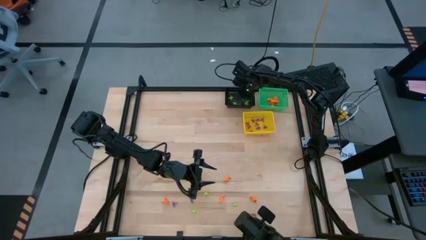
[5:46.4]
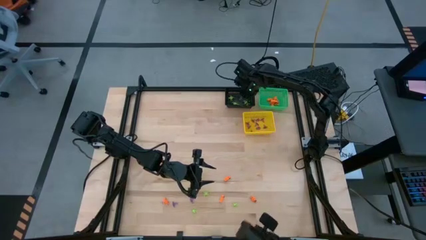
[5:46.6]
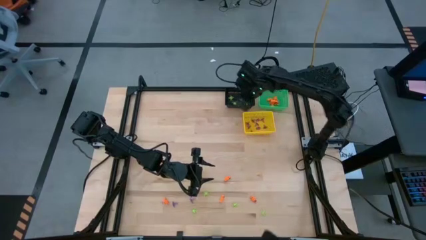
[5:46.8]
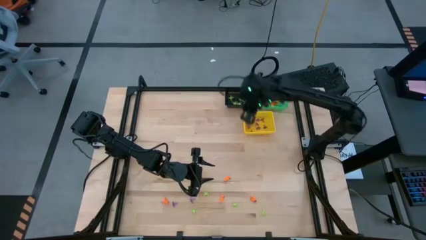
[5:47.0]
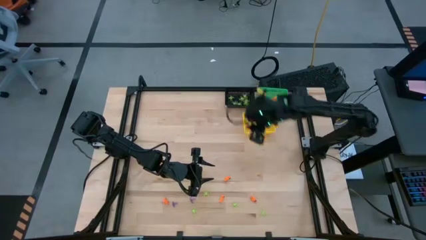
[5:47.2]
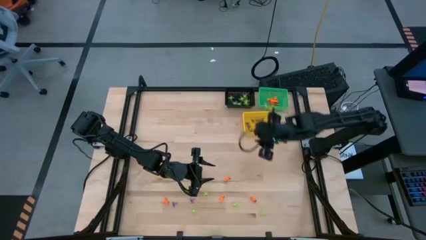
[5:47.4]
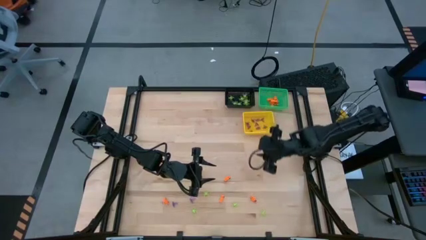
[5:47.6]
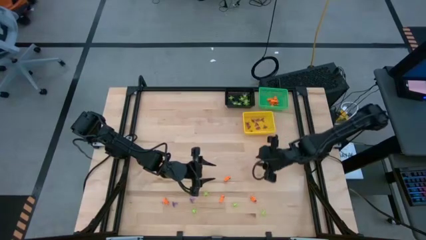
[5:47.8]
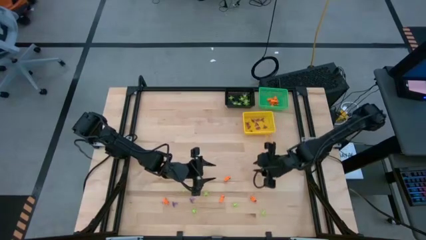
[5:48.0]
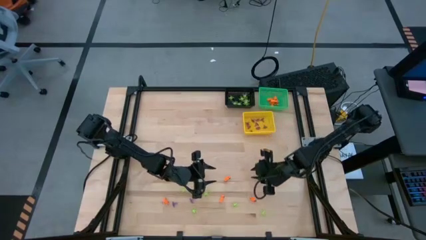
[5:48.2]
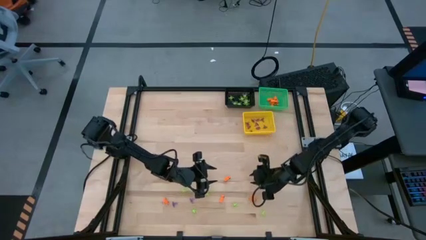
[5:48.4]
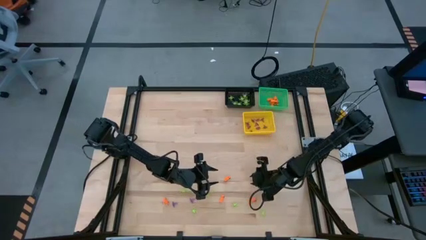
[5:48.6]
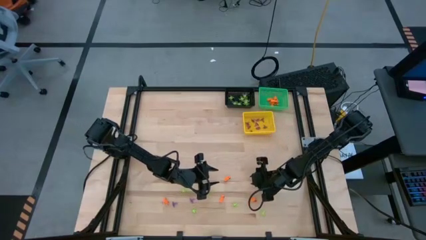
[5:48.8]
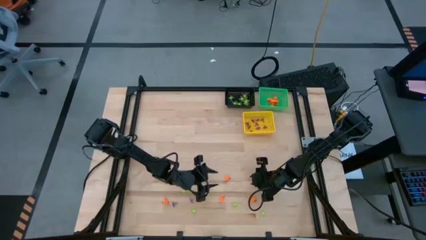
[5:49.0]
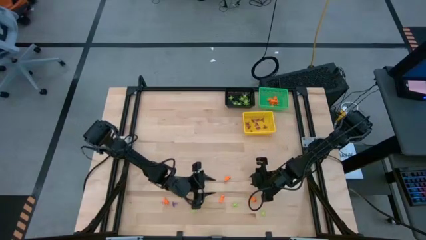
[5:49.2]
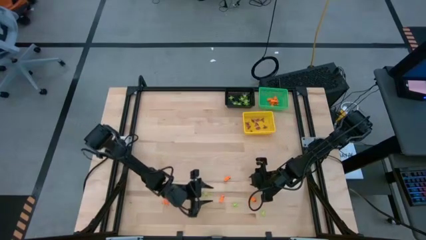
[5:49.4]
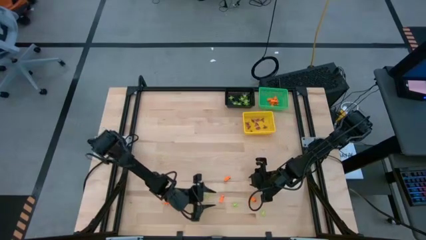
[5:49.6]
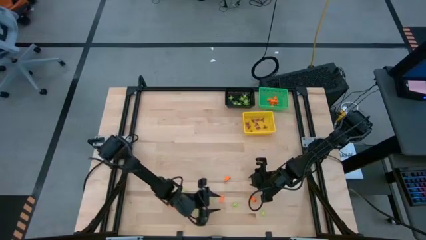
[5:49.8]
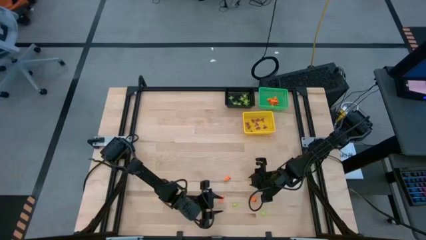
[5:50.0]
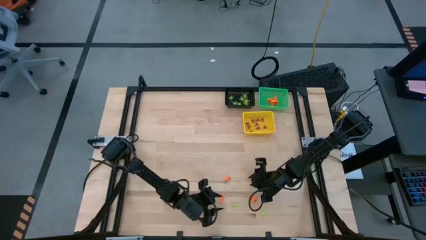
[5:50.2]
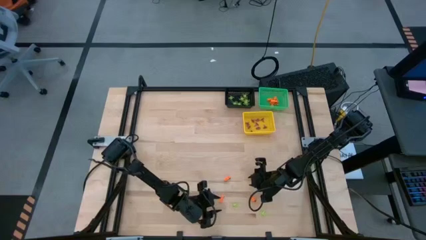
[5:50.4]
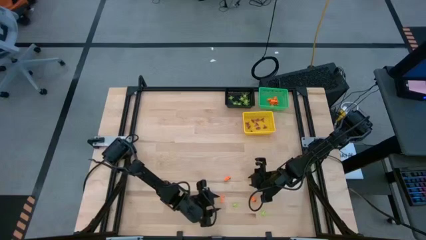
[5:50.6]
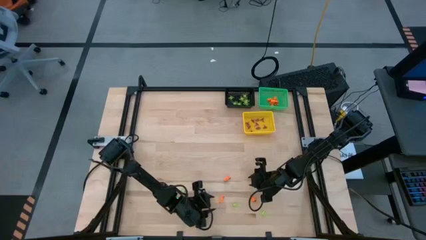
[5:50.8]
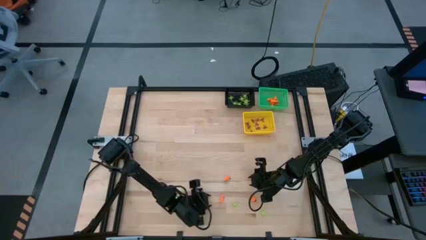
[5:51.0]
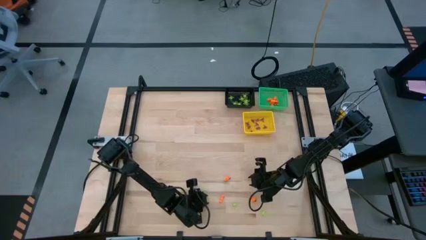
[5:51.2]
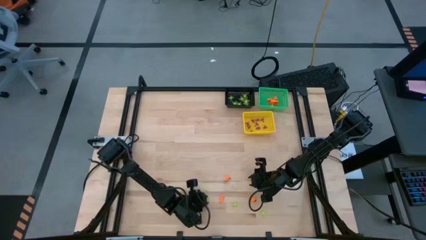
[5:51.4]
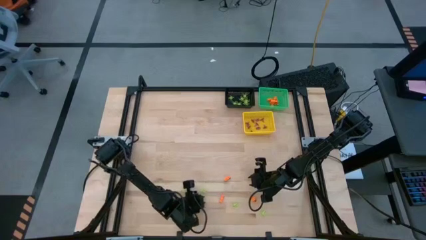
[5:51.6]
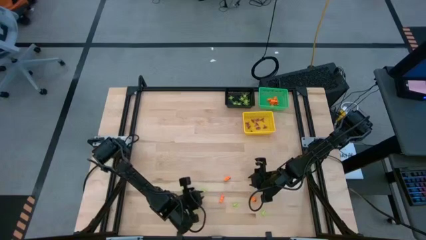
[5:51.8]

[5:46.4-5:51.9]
Task: Sort Halloween decoration
Put the green spider toy into the black basket

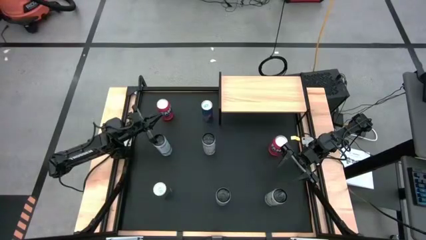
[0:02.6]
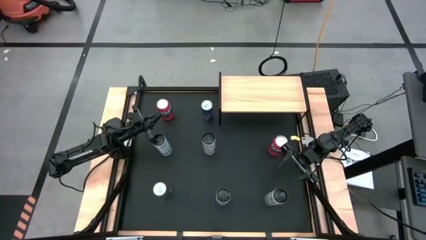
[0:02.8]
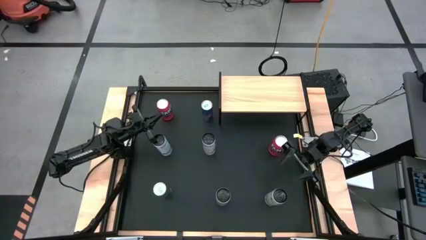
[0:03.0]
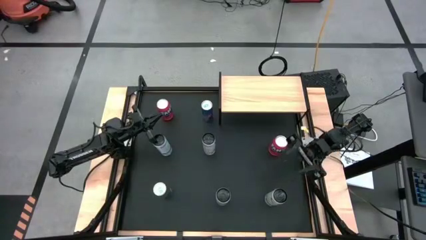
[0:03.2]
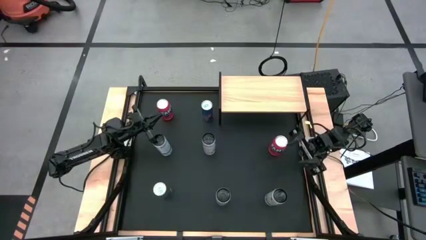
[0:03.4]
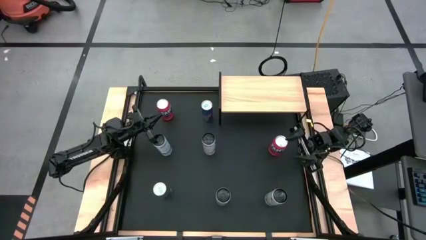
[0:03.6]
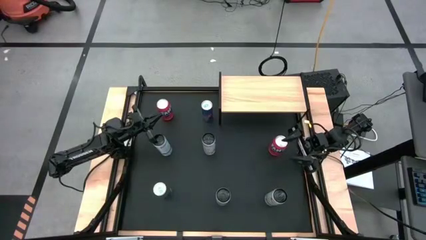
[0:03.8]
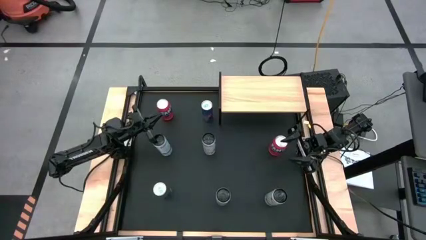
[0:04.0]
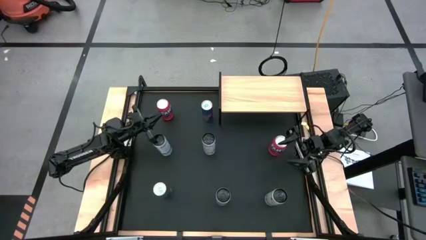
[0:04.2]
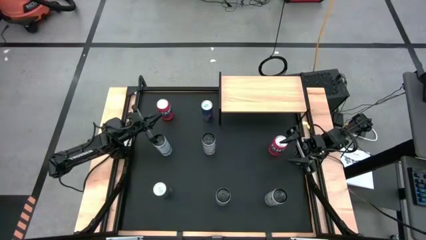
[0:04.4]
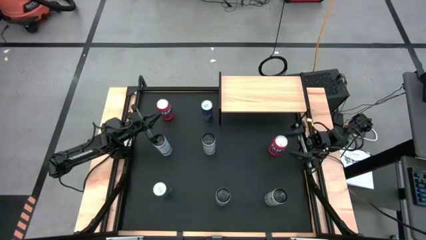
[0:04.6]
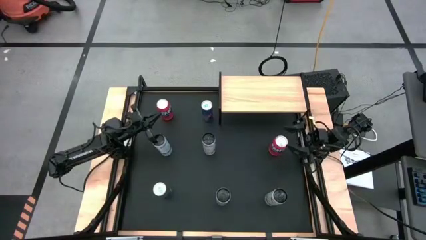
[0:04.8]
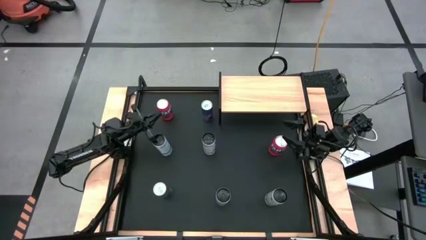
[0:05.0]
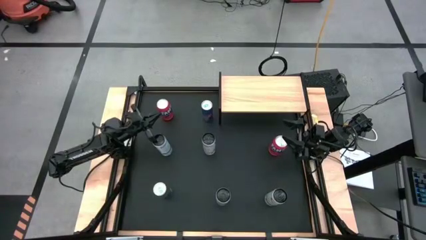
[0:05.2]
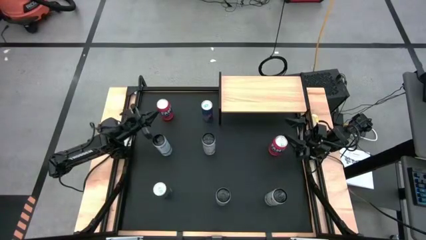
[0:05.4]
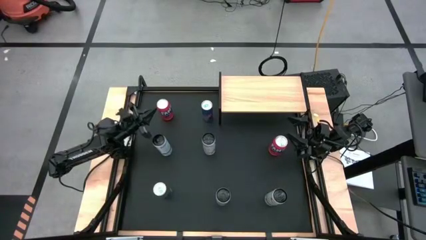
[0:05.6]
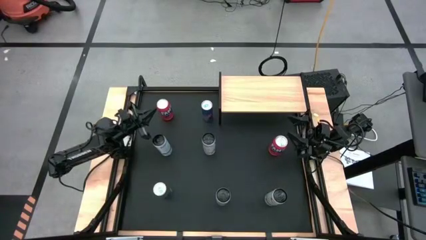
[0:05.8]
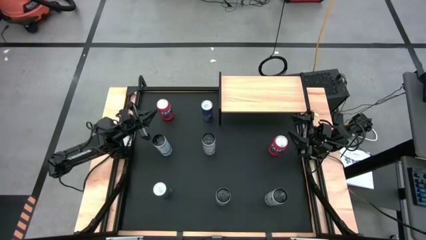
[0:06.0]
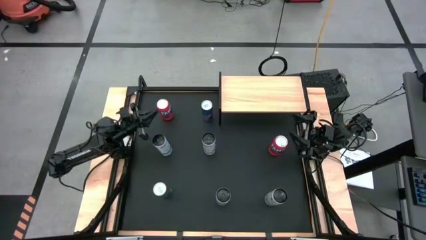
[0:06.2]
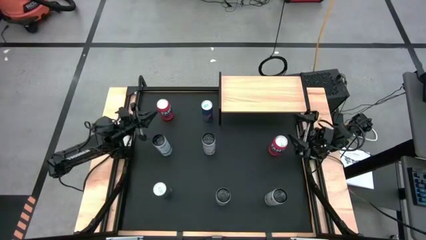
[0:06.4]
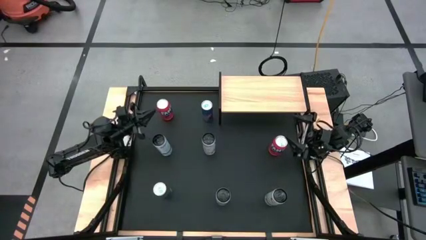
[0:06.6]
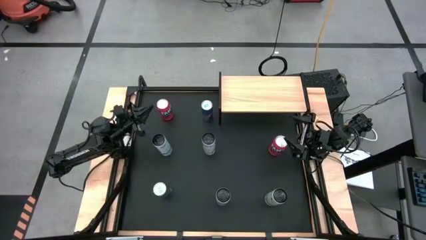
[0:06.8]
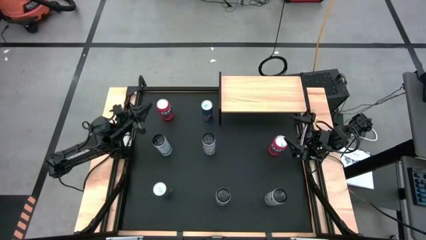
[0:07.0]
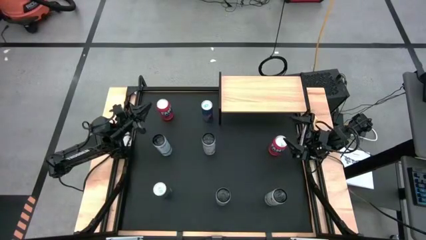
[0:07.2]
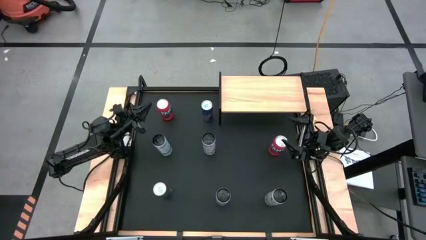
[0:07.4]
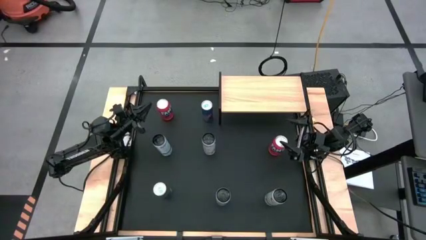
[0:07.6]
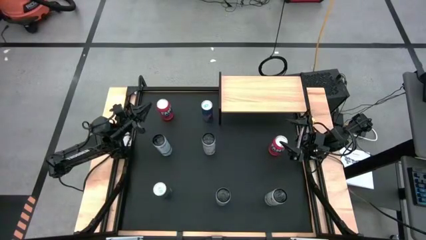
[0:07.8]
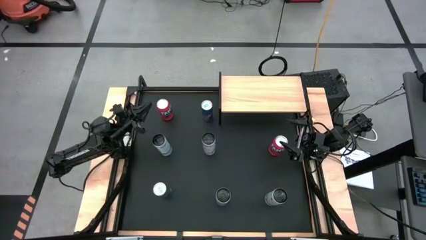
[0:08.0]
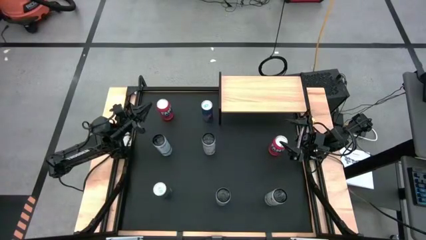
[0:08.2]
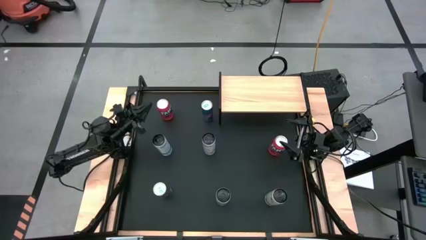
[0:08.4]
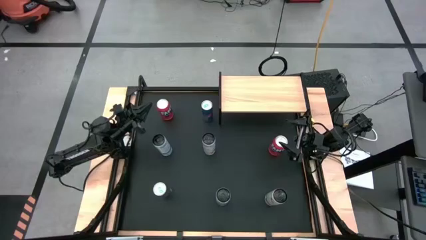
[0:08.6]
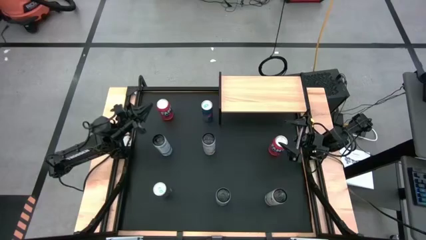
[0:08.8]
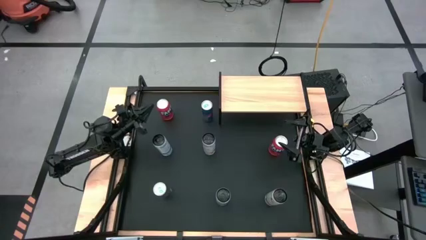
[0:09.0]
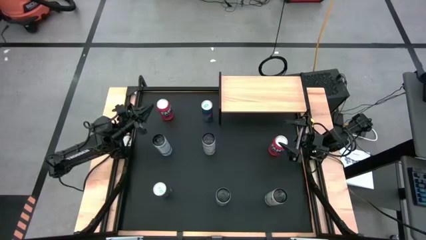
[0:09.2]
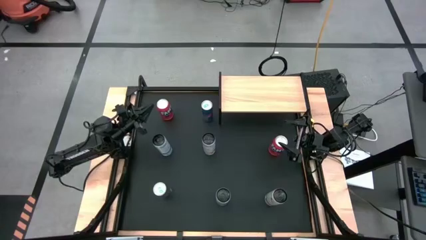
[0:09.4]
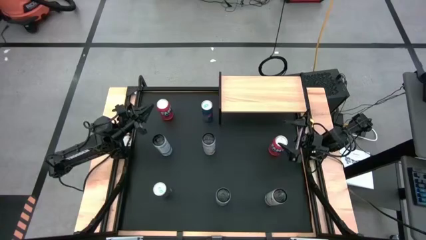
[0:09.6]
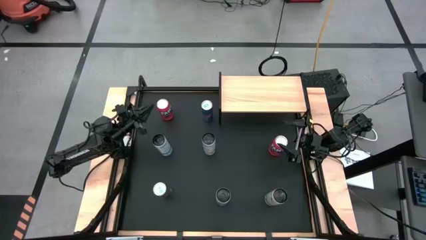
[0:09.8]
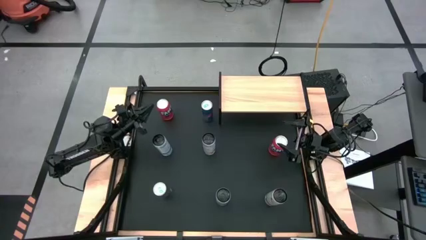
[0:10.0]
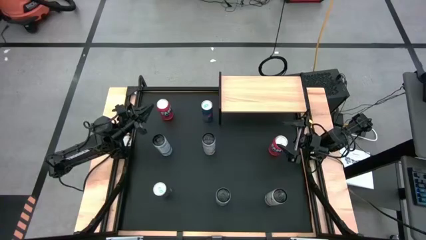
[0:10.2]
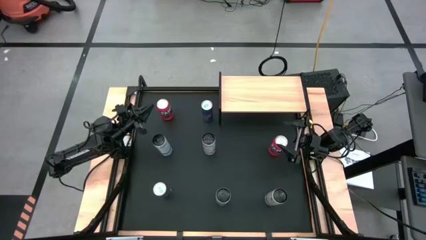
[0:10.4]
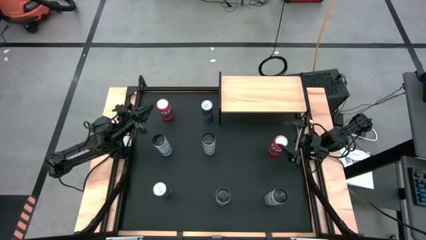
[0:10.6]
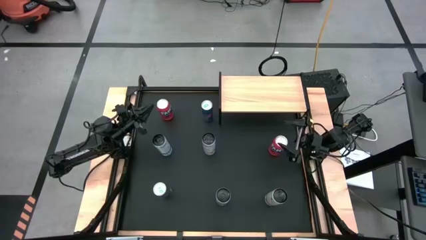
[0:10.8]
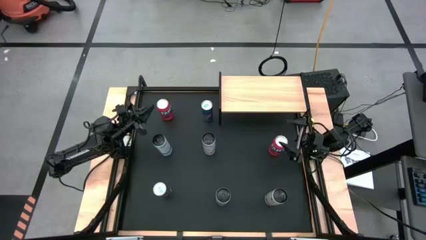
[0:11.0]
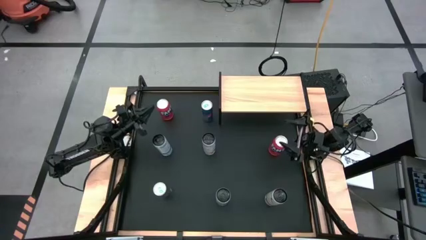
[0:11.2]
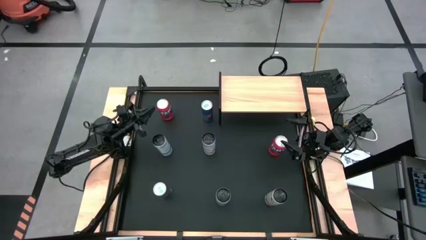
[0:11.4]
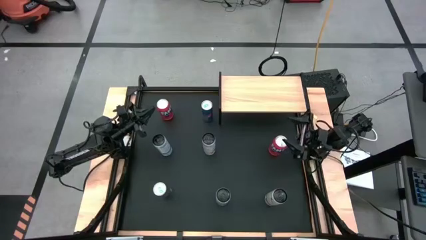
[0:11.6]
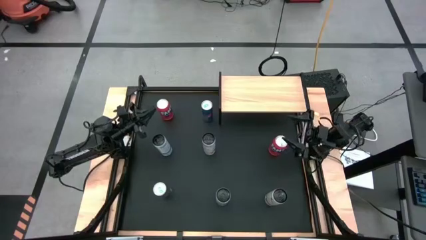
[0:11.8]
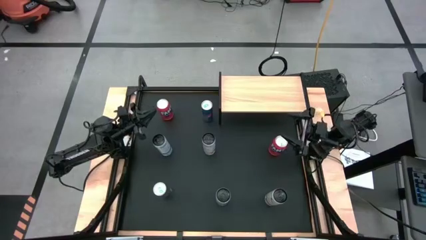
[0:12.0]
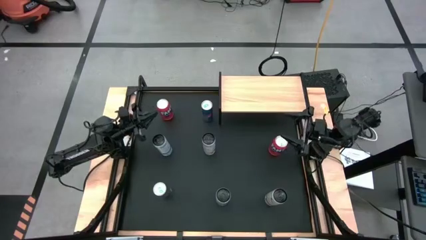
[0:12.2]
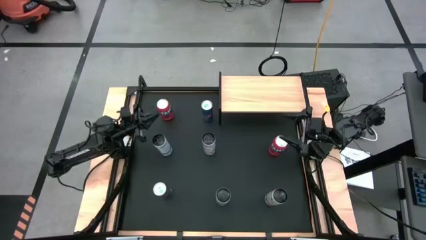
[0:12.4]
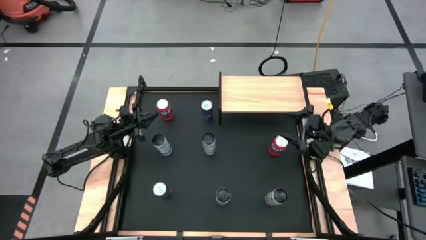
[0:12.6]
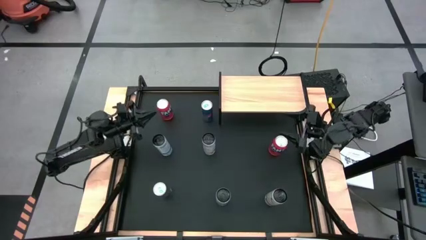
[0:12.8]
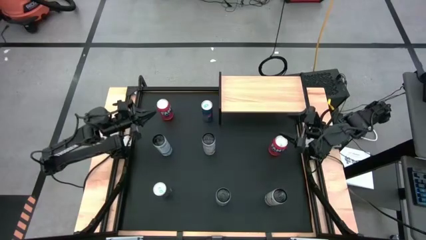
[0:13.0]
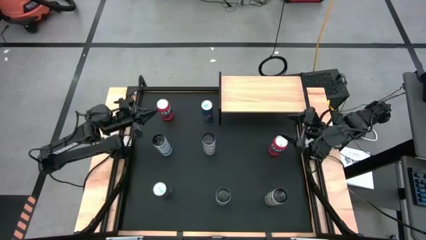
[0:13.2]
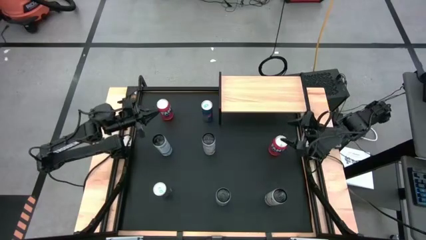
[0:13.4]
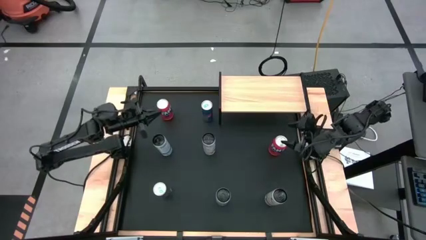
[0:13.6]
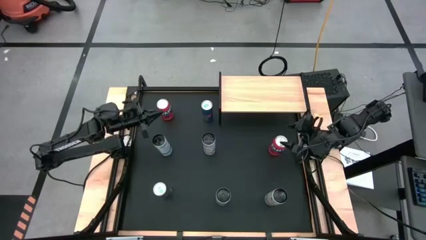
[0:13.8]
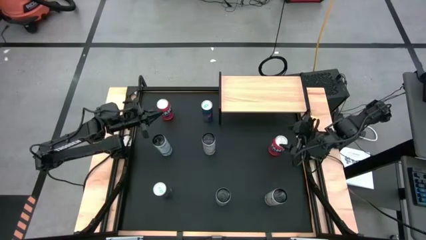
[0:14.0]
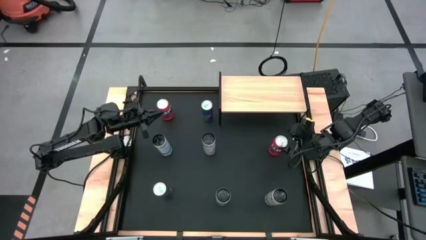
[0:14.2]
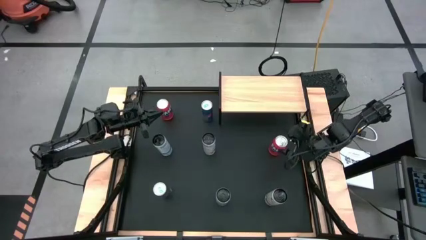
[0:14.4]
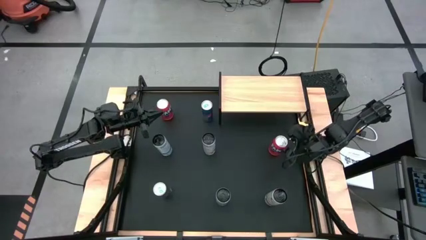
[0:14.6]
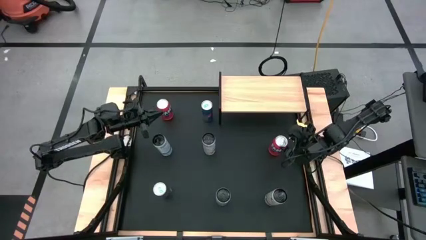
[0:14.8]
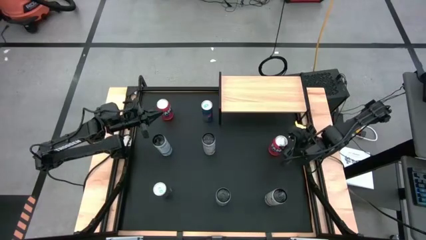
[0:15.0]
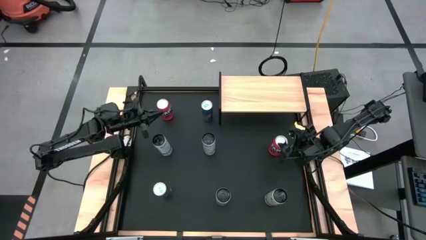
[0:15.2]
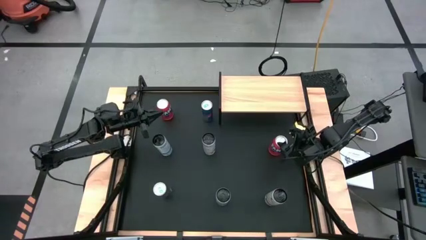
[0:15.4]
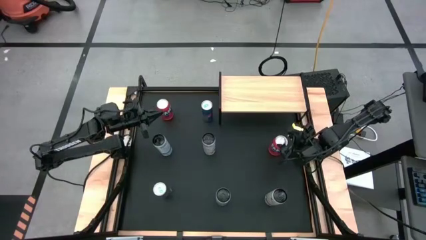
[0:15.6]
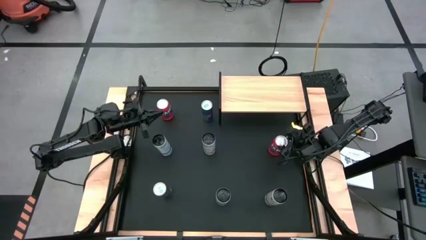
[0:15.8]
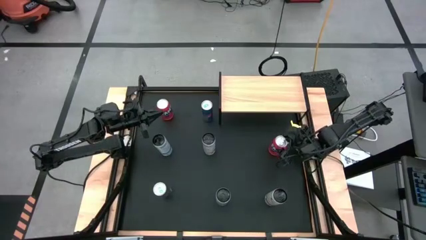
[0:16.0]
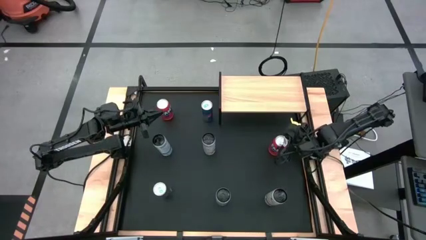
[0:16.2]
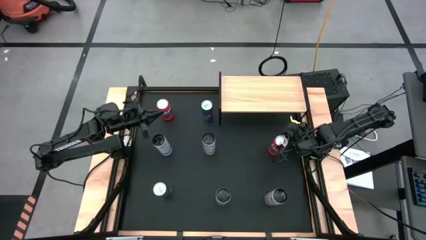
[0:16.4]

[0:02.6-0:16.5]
Task: Place canned beverage on shelf
Put the right red soda can on the shelf
